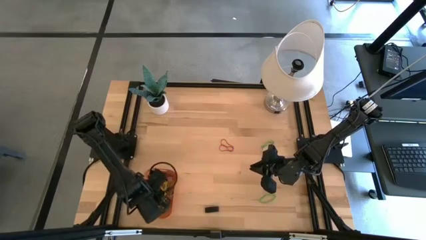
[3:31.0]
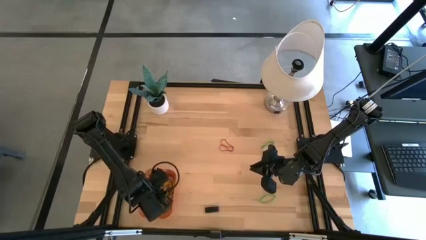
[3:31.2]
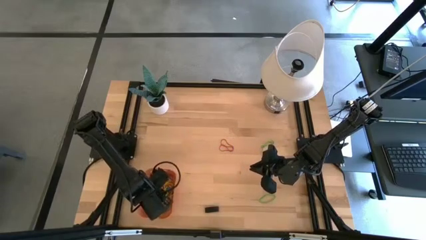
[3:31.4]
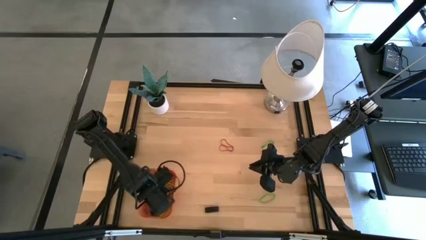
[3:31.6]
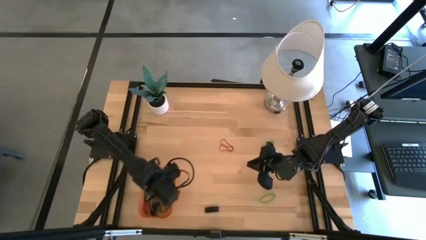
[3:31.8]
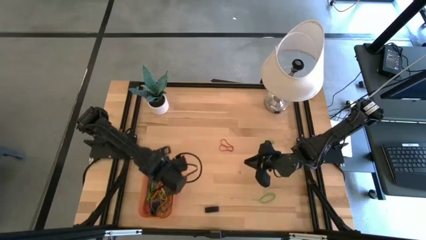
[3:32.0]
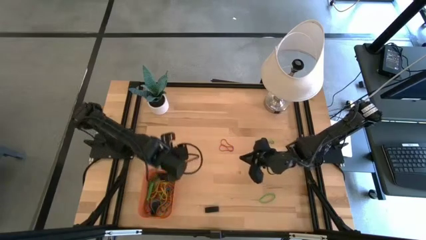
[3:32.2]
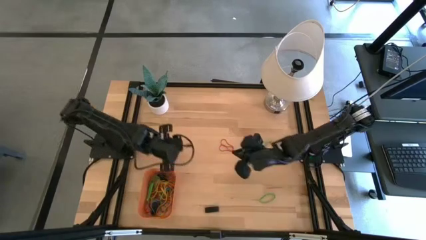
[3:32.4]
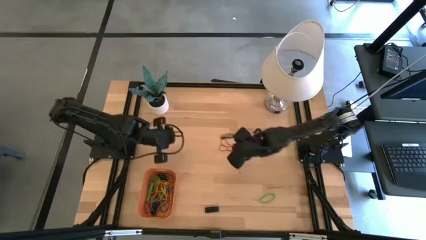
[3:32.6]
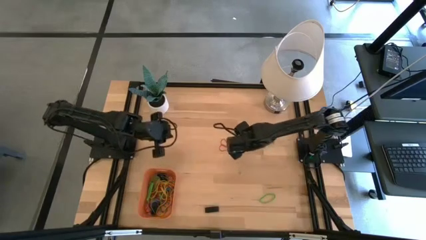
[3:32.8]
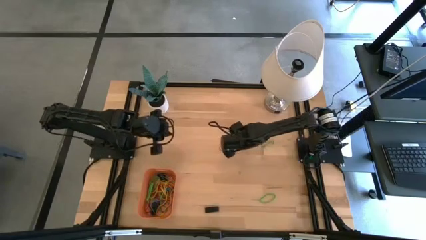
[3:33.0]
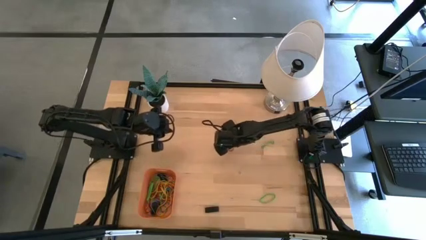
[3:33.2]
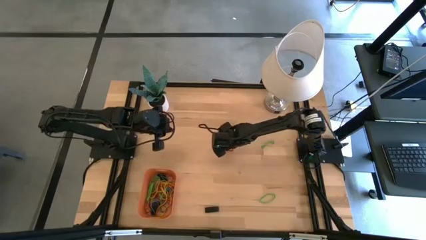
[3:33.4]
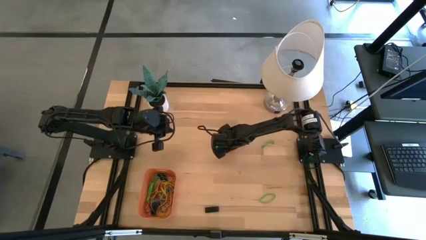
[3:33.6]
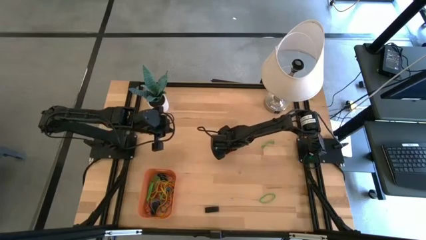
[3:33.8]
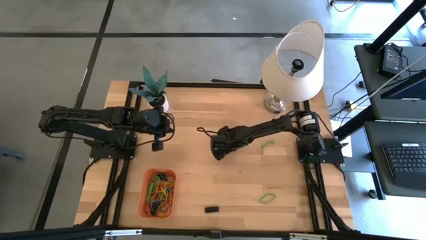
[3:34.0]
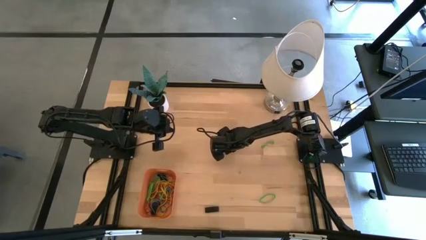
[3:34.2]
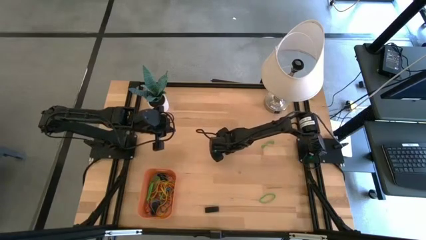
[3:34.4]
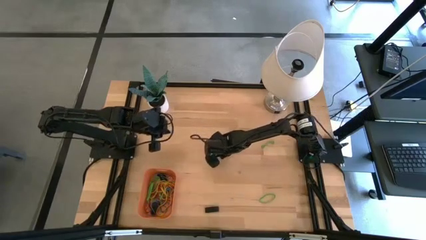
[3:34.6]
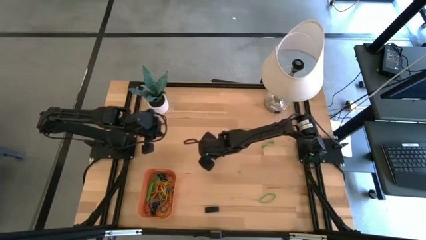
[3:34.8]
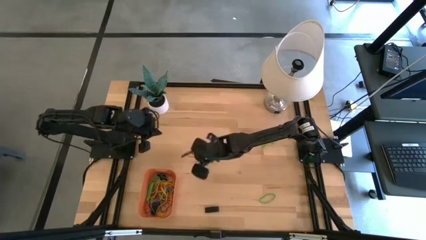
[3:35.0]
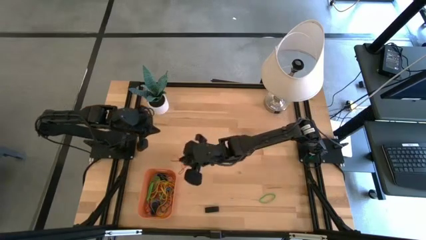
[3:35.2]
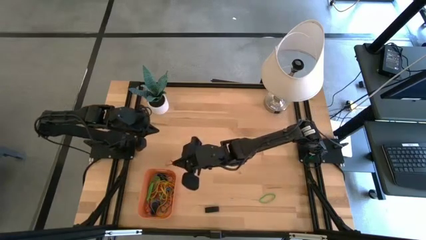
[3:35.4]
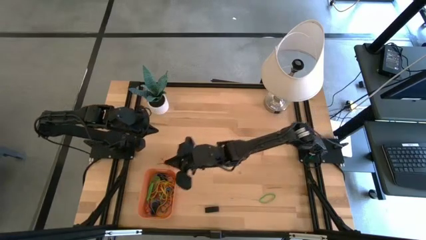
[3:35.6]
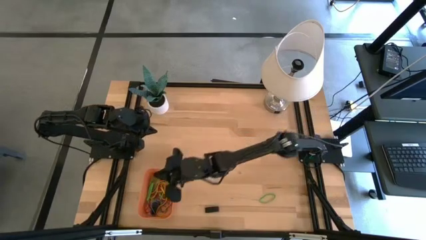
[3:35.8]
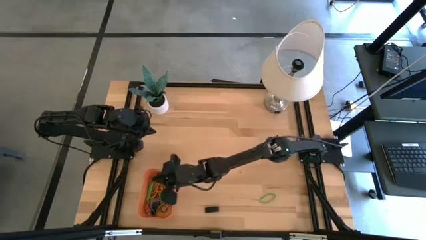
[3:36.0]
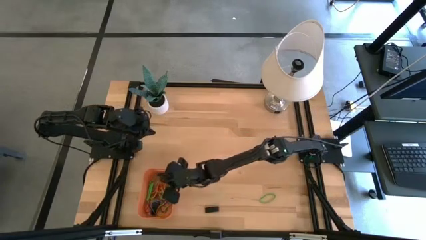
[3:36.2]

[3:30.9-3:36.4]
Task: Pick and place rubber bands into bin
Put the red rubber band into the orange bin

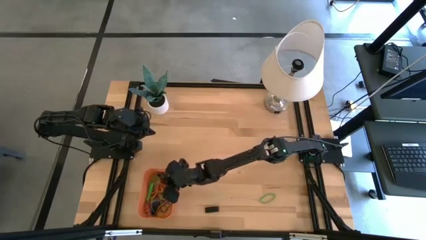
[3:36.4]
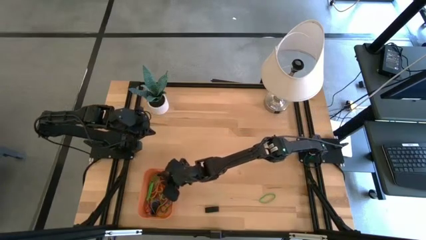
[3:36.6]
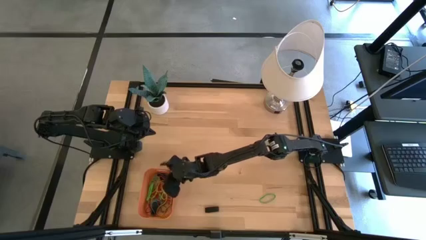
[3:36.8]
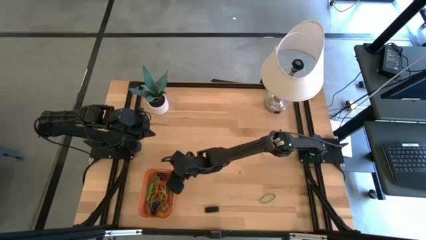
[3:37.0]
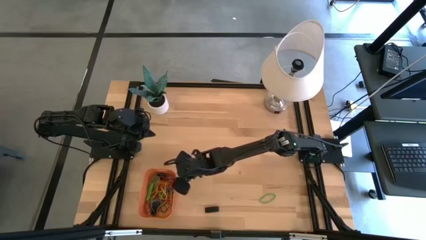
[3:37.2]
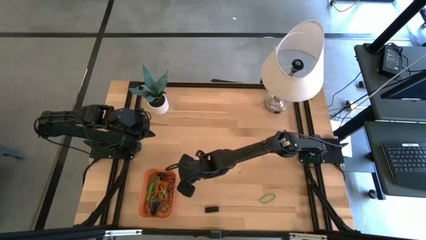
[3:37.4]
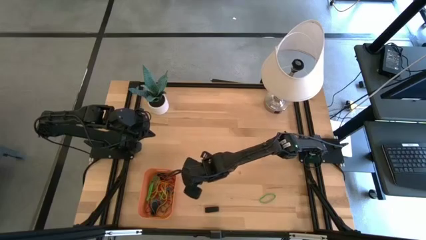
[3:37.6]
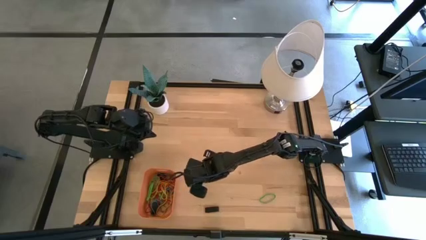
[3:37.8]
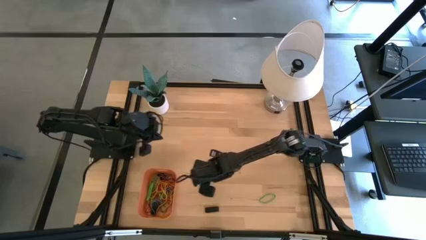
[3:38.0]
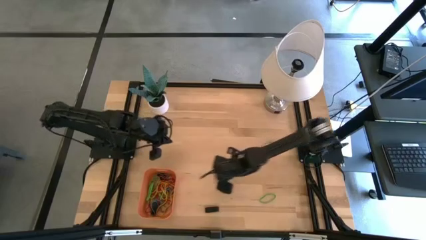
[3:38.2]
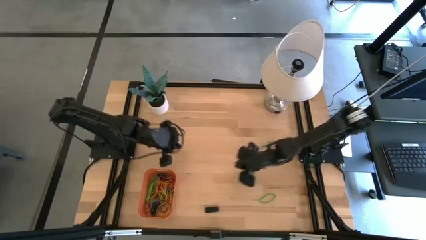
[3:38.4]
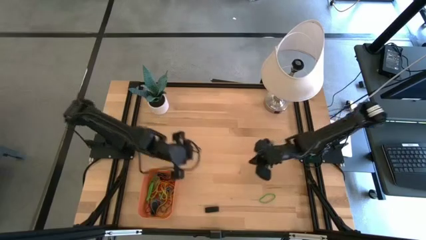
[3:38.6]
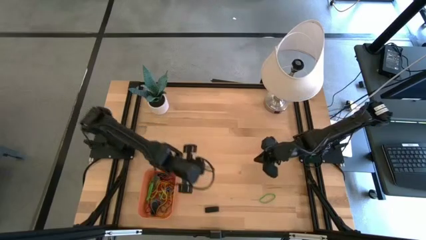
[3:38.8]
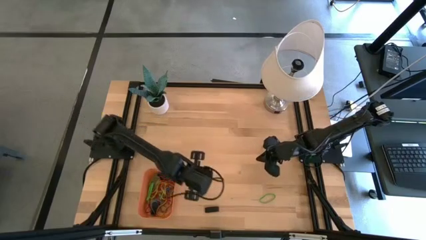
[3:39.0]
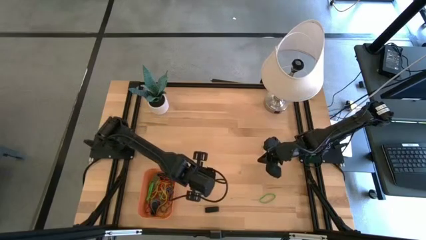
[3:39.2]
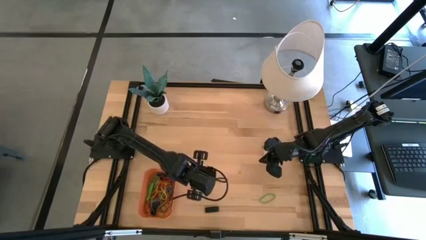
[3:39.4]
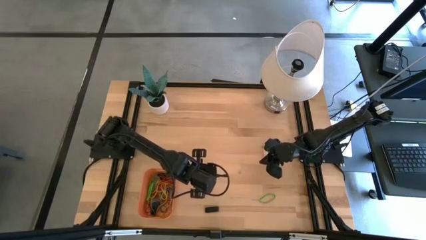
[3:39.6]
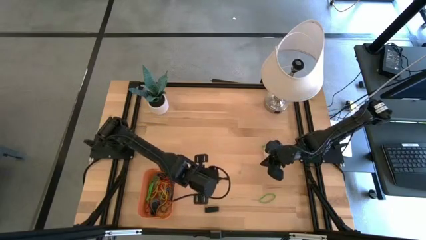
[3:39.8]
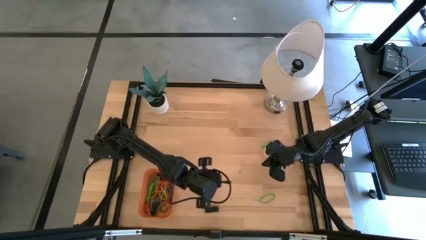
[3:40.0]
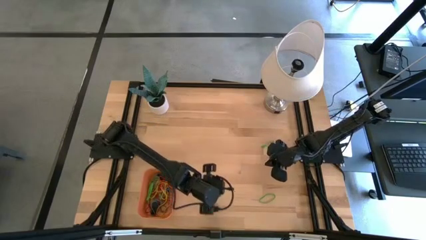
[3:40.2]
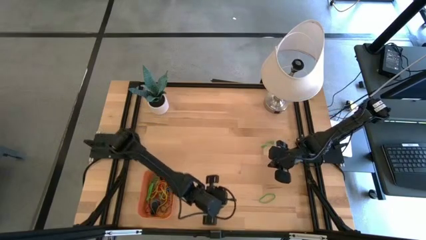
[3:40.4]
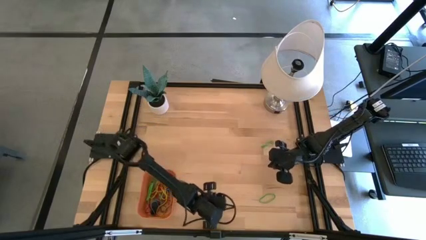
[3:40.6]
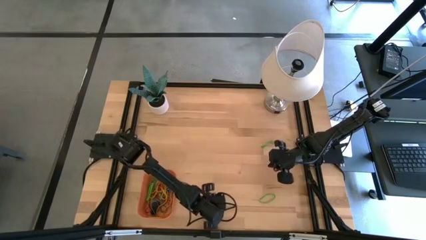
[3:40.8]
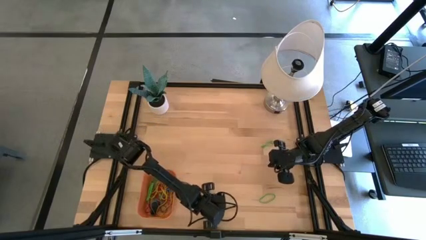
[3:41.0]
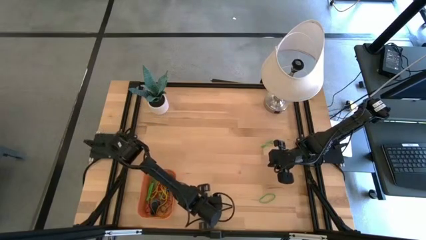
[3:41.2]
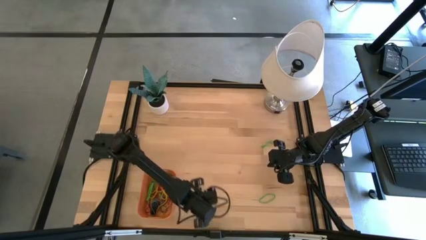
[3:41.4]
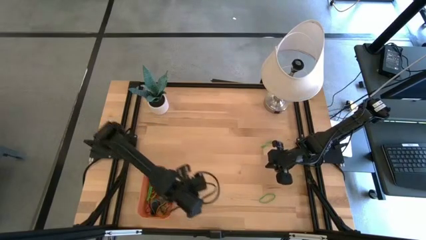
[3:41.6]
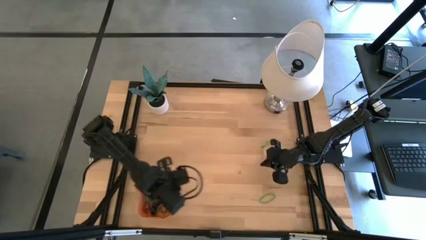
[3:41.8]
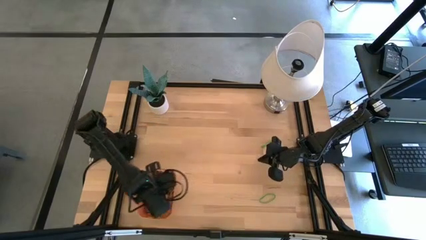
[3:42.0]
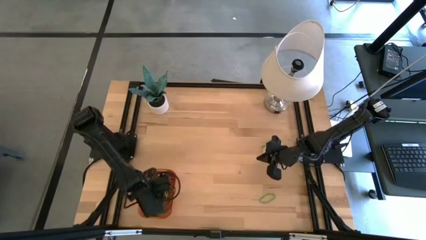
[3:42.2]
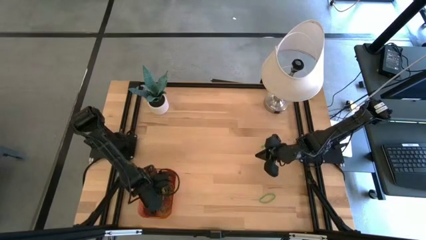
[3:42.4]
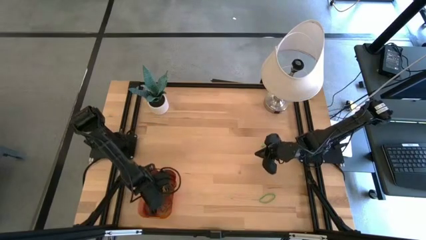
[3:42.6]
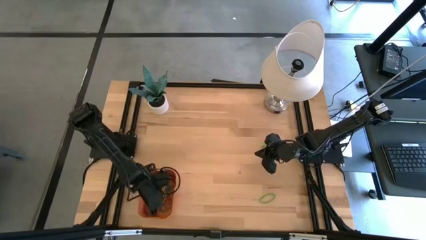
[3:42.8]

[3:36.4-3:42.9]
Put the black rubber band into the orange bin

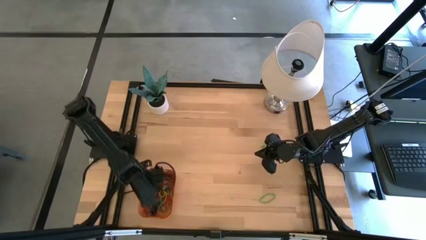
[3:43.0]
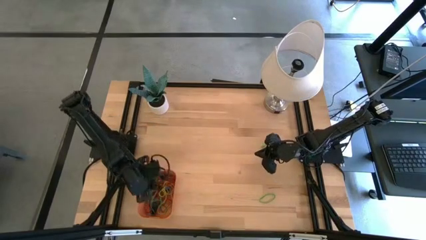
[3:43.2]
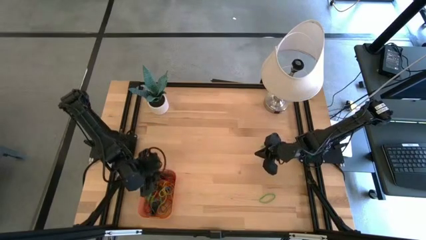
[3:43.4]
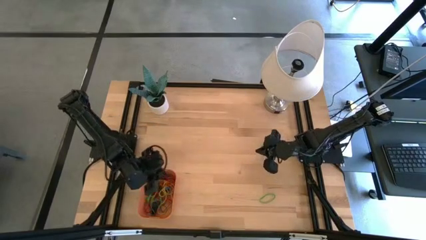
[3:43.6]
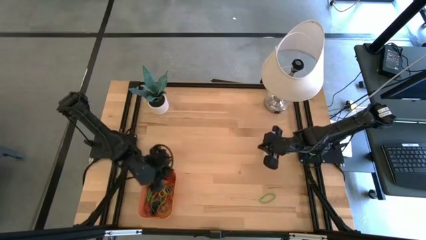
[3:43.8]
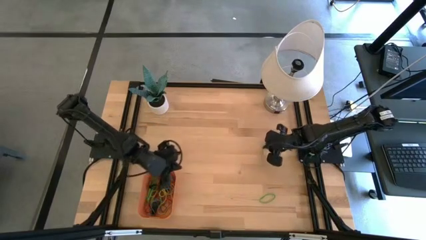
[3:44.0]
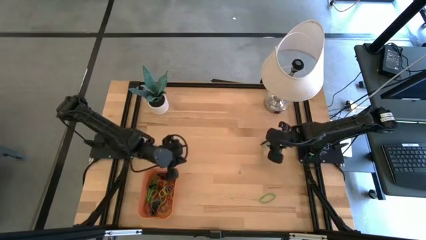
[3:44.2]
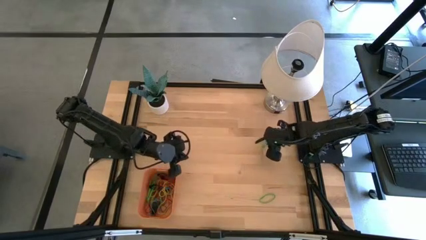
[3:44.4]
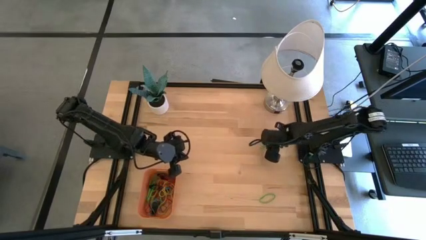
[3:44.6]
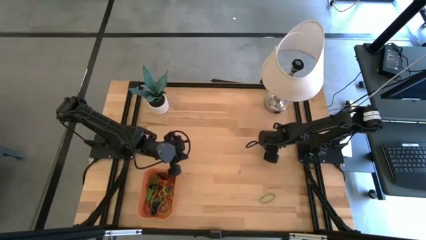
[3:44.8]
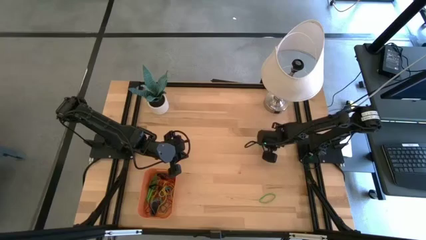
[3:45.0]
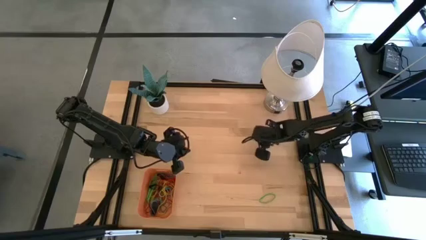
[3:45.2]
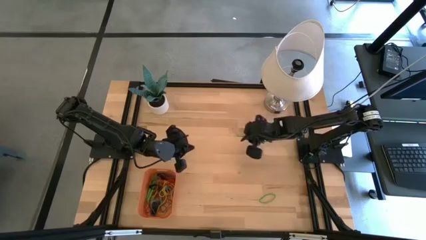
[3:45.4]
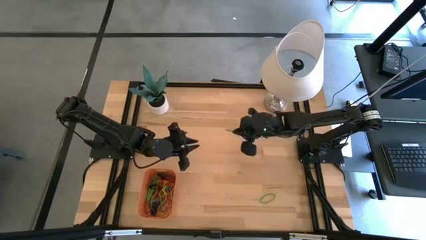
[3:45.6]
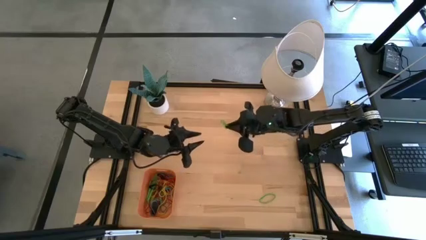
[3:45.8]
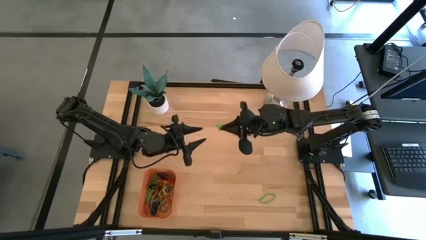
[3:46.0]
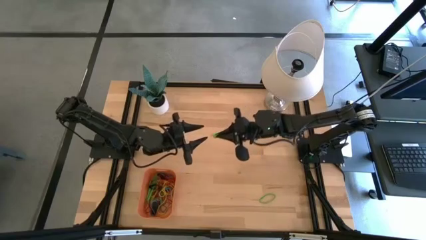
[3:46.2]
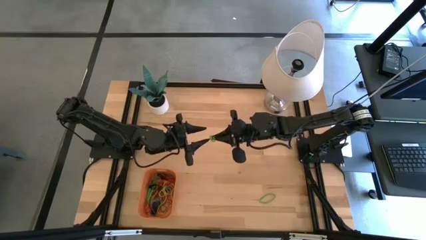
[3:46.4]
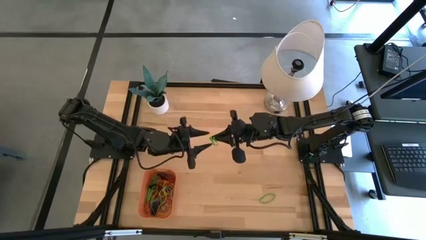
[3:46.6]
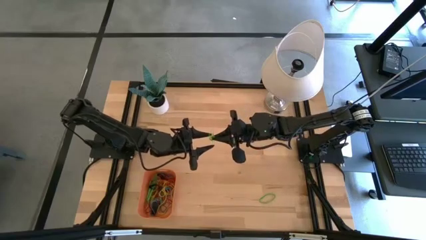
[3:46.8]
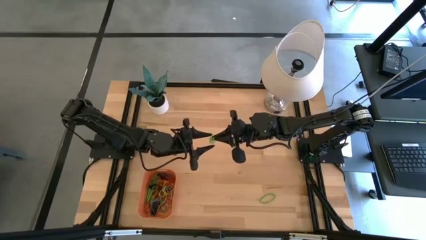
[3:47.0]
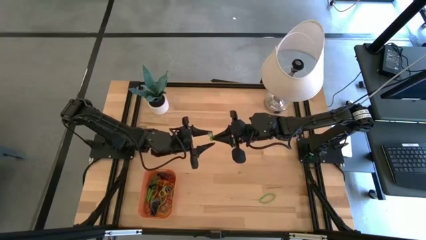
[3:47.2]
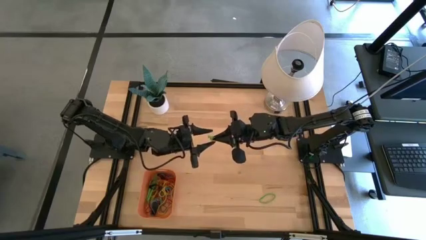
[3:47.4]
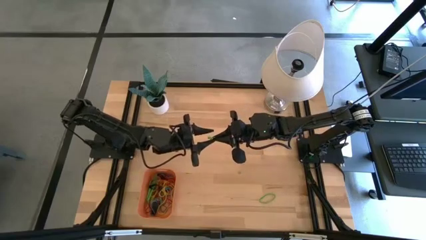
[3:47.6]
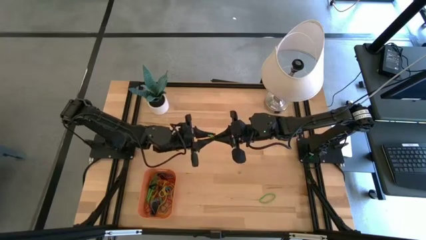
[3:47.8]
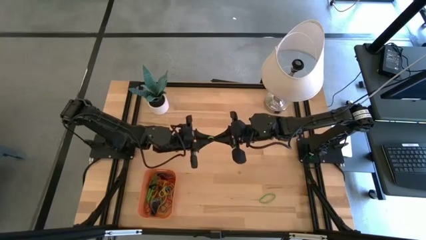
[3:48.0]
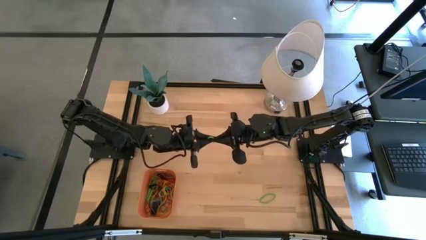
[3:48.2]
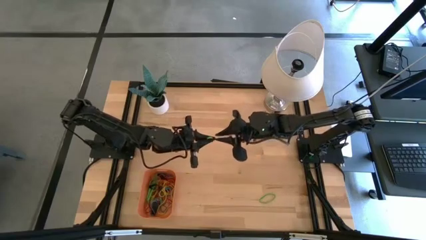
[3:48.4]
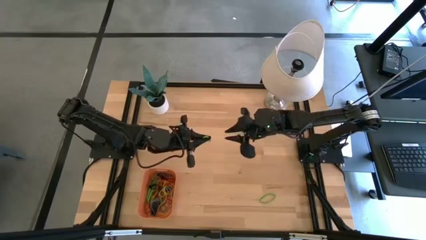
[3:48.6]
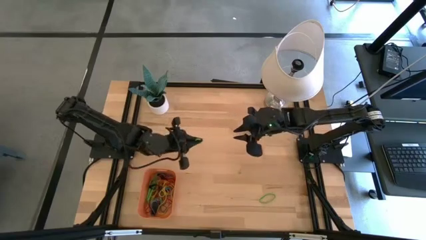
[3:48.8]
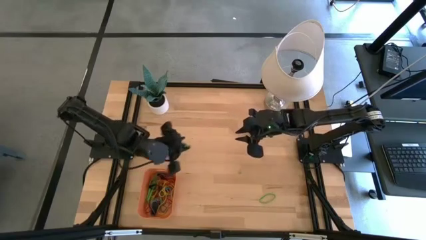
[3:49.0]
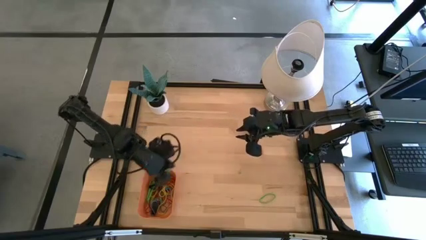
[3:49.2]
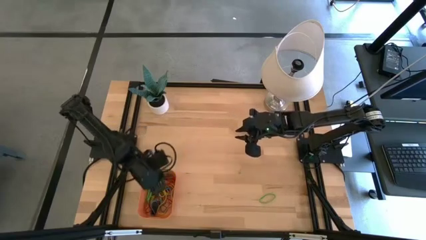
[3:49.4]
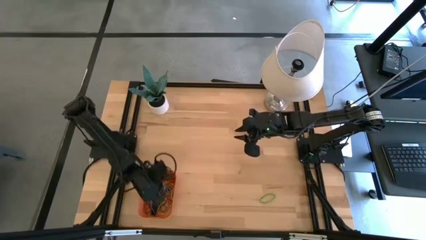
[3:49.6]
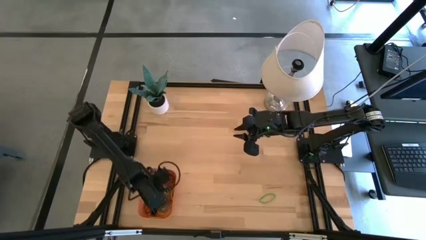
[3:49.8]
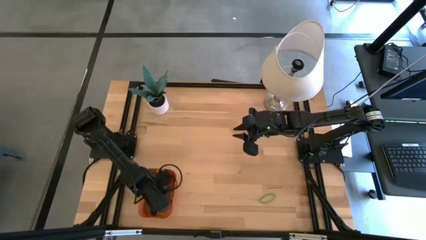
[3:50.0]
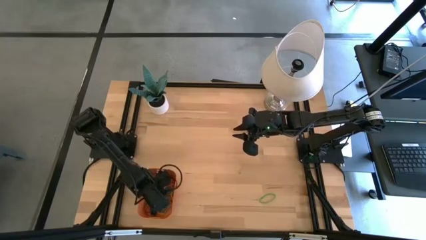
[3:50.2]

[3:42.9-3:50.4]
Put the green rubber band into the orange bin
